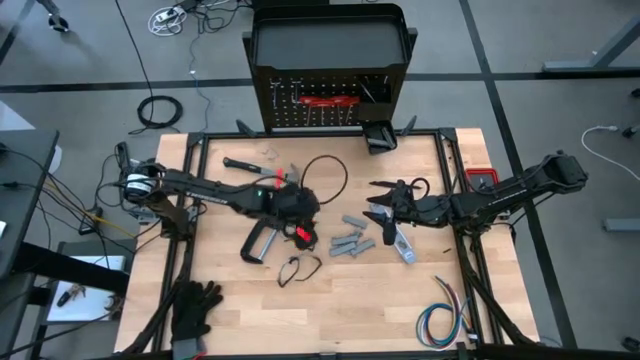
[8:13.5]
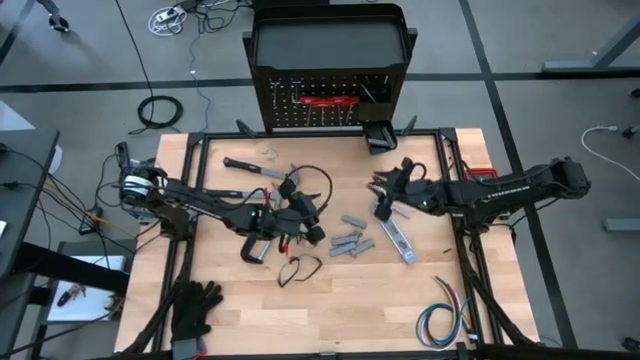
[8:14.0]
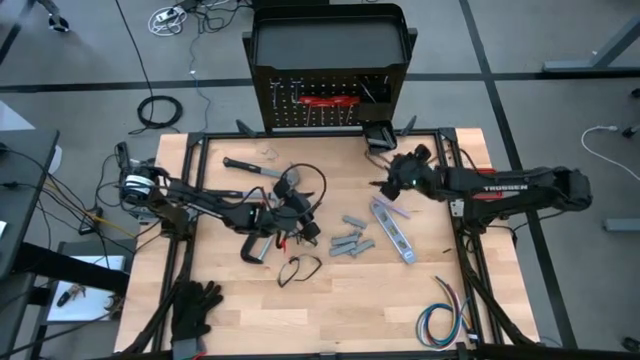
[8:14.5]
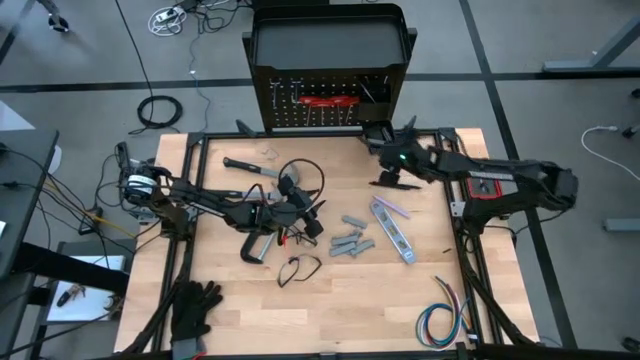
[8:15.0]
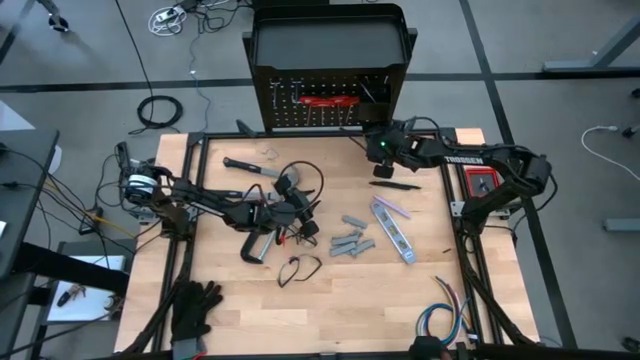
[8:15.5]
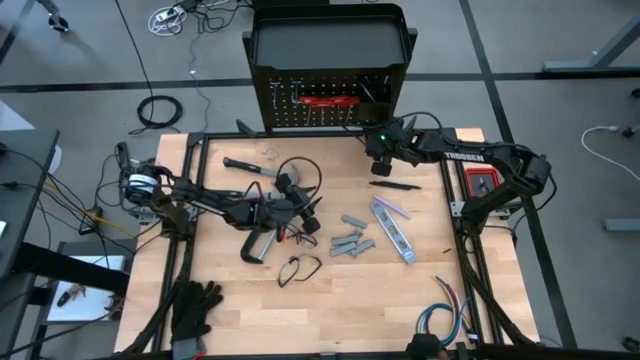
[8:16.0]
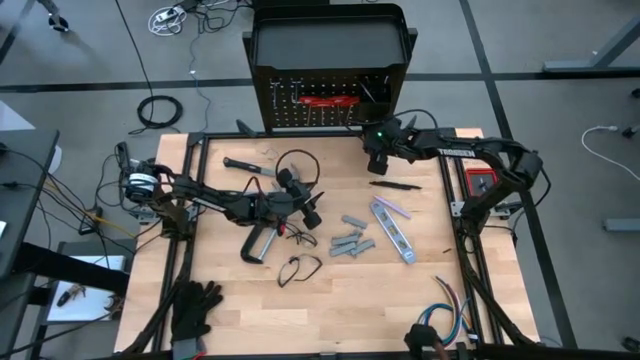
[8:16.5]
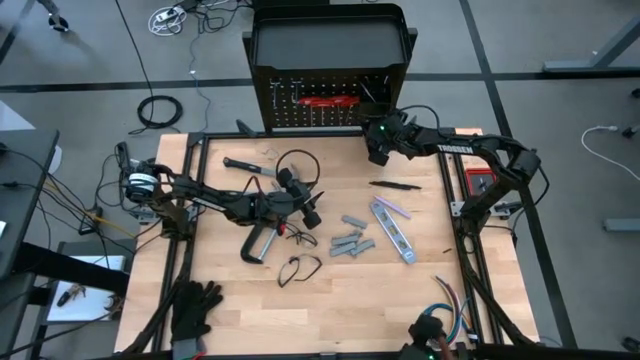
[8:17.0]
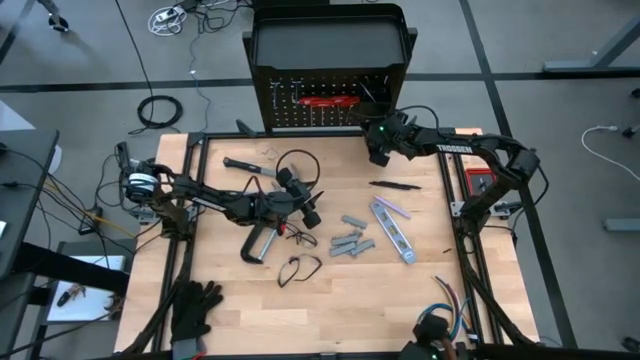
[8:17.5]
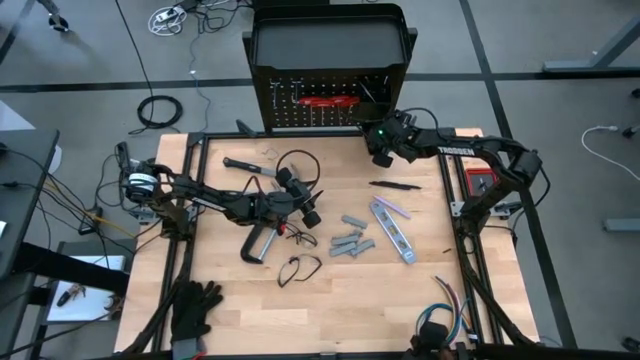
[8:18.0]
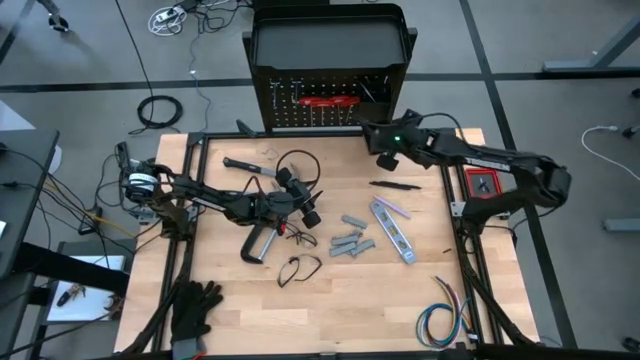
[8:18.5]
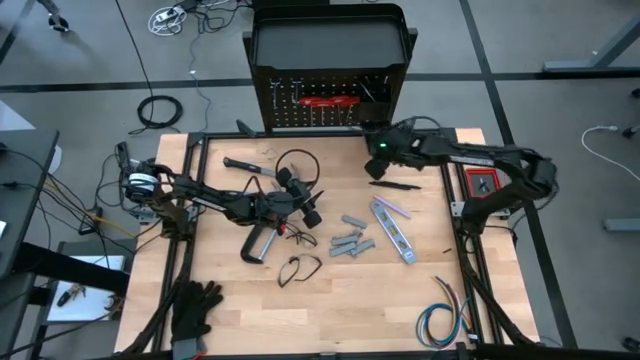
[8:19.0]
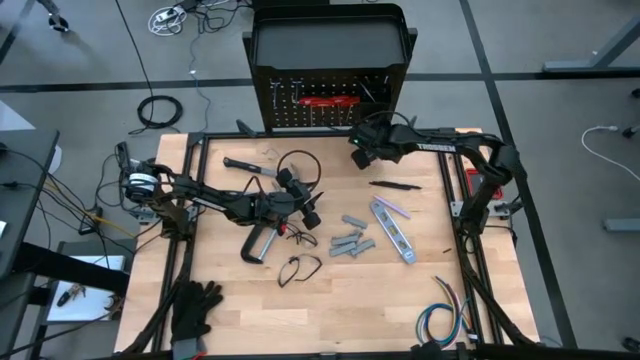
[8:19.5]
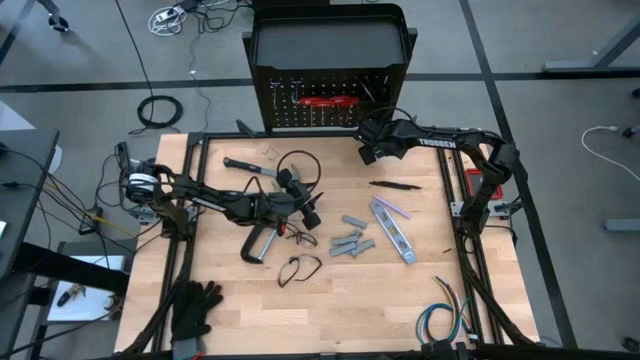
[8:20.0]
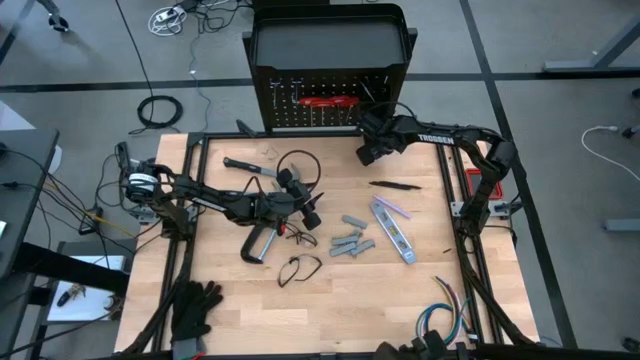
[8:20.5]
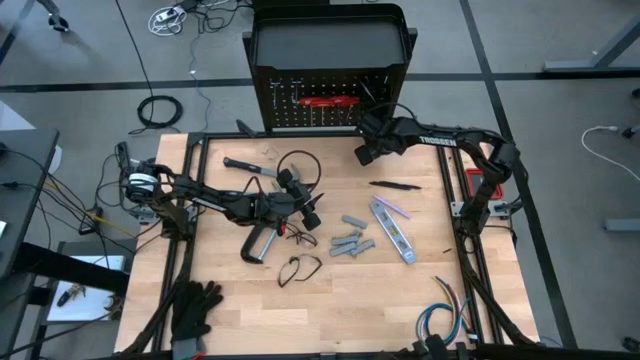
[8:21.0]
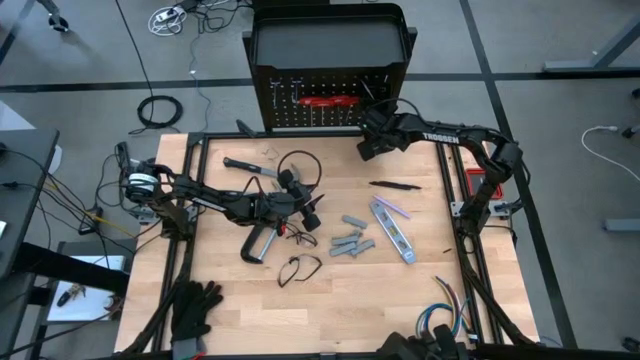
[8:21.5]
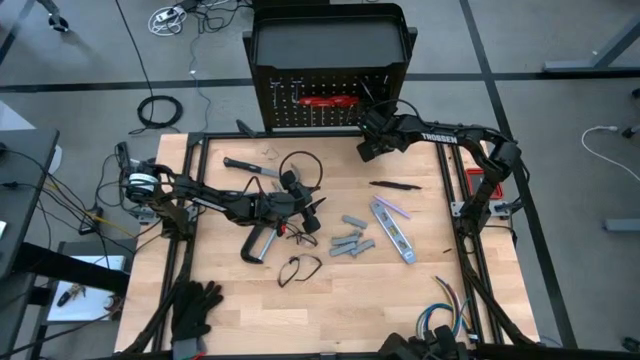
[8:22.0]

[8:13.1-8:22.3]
Task: Hang tools onto peg board
Put the screwdriver bits on the table

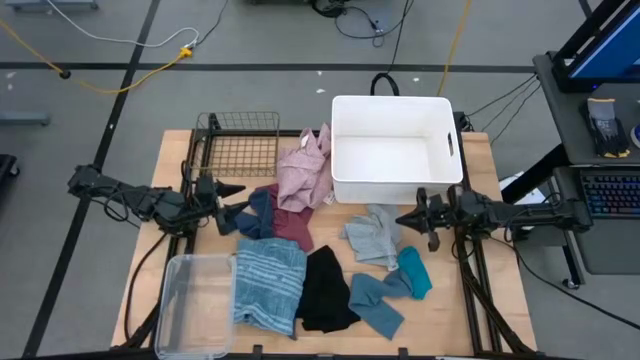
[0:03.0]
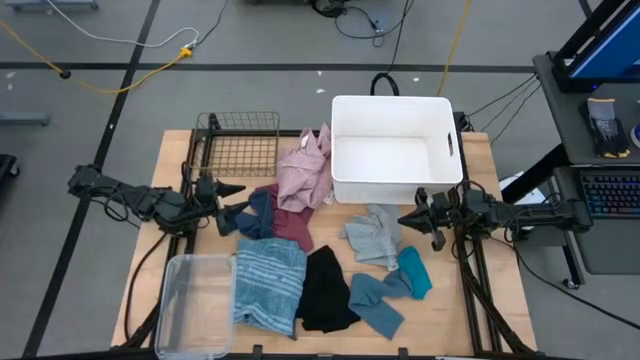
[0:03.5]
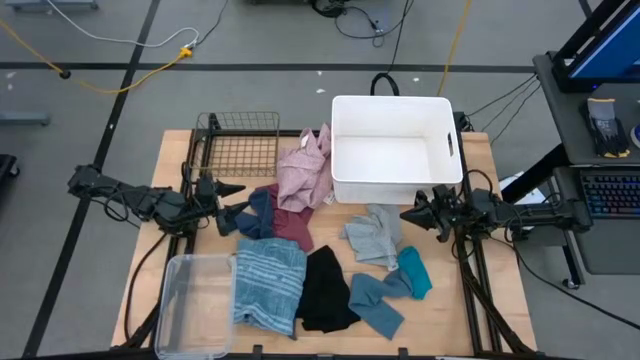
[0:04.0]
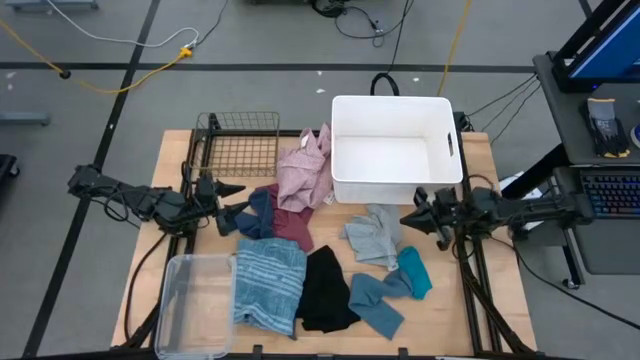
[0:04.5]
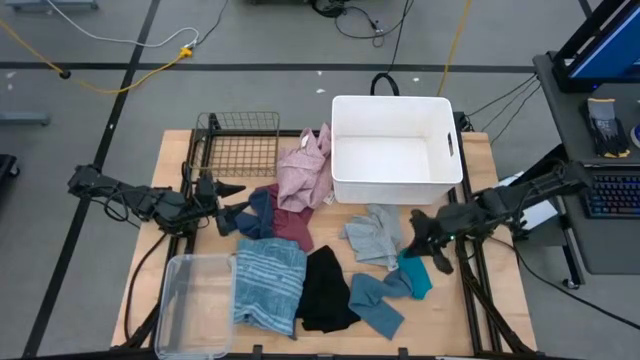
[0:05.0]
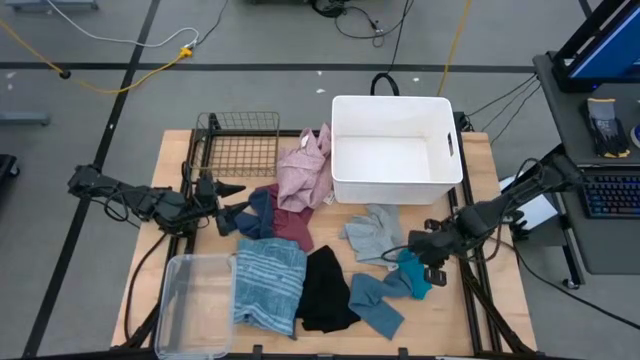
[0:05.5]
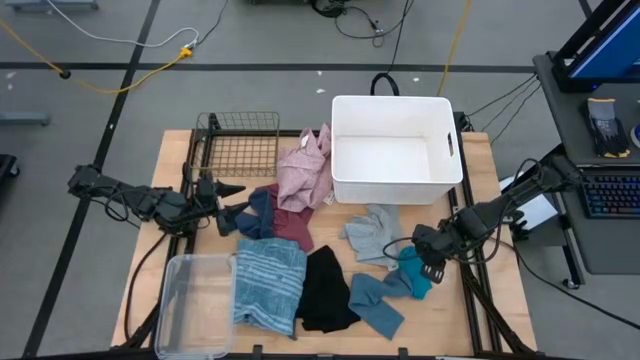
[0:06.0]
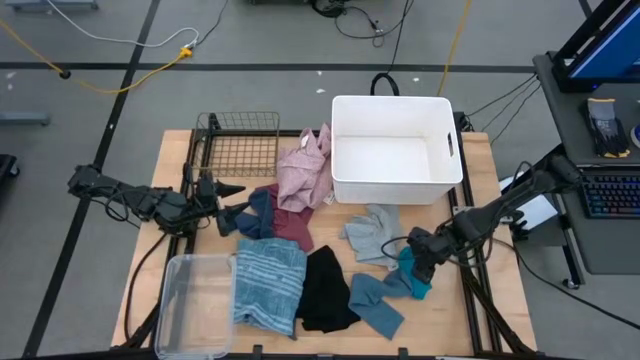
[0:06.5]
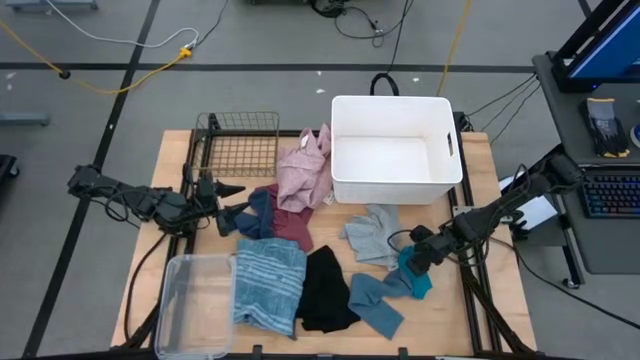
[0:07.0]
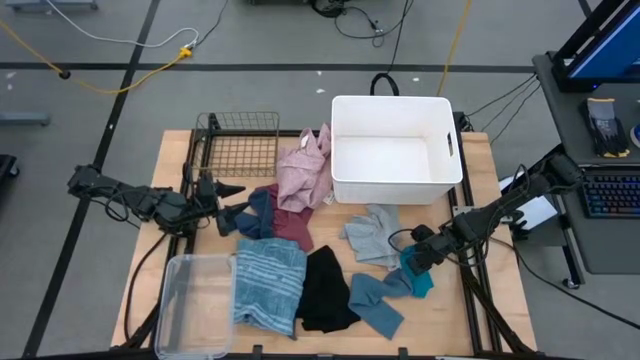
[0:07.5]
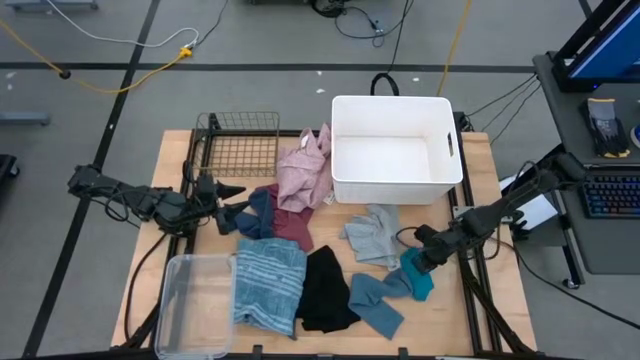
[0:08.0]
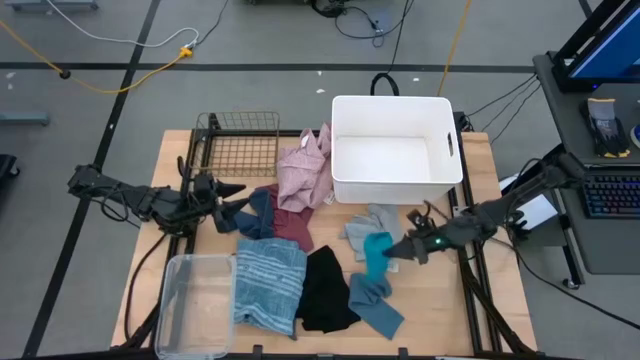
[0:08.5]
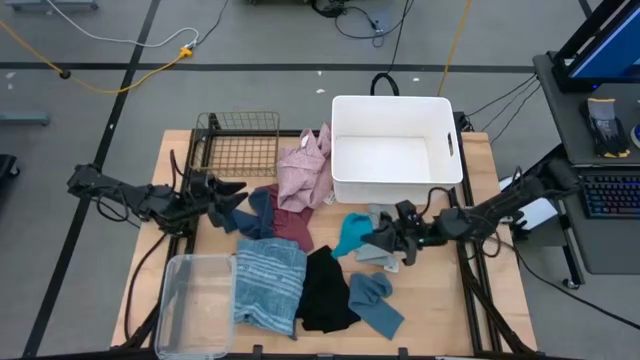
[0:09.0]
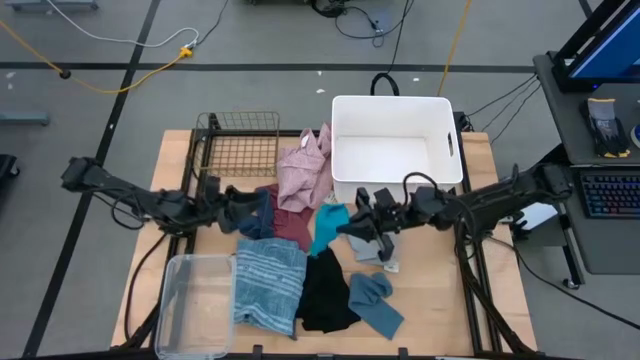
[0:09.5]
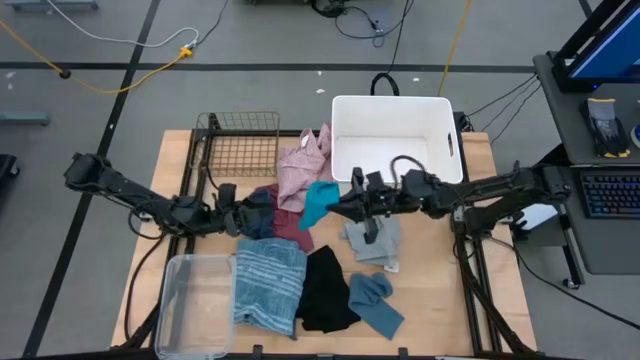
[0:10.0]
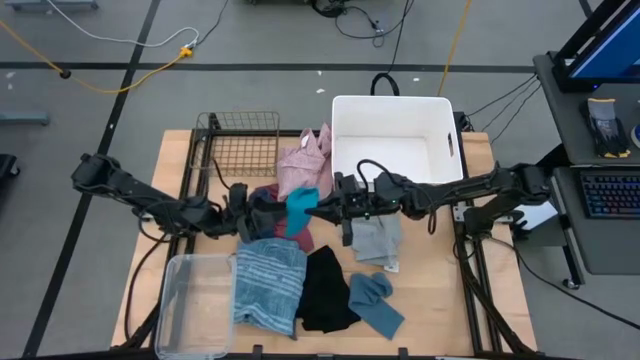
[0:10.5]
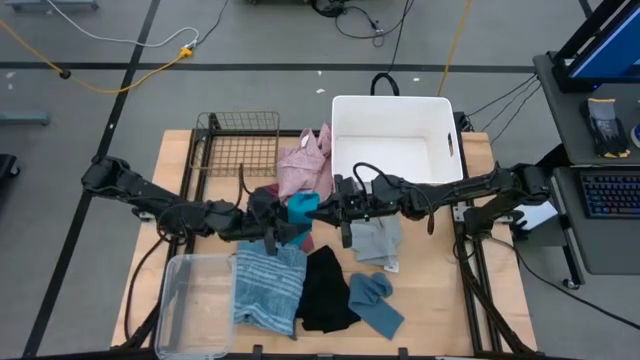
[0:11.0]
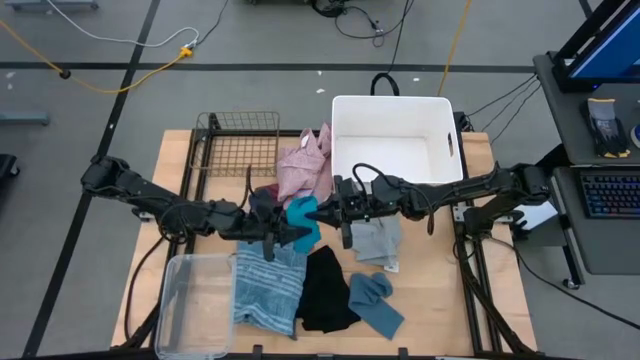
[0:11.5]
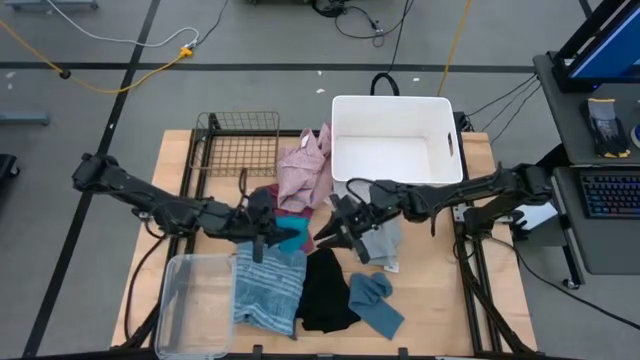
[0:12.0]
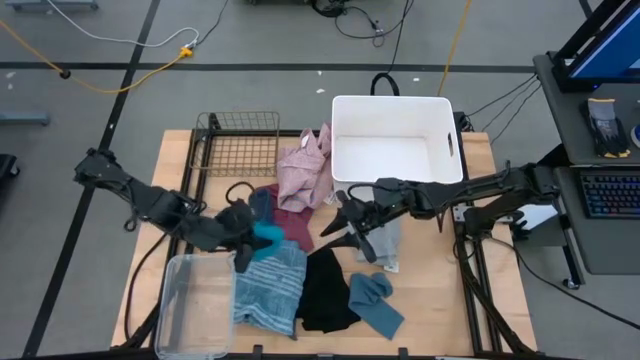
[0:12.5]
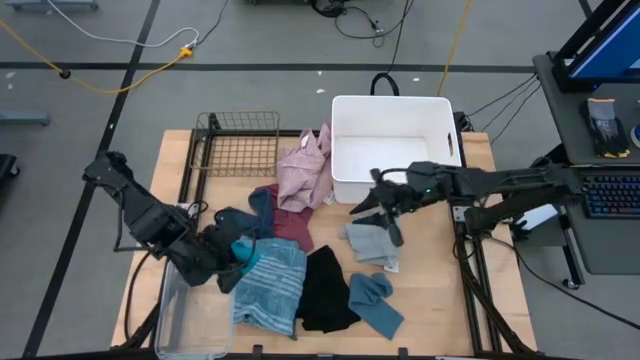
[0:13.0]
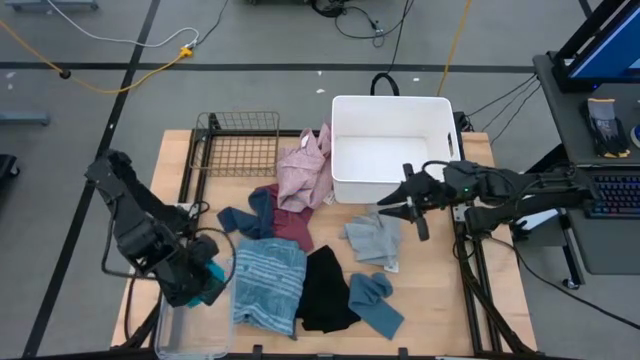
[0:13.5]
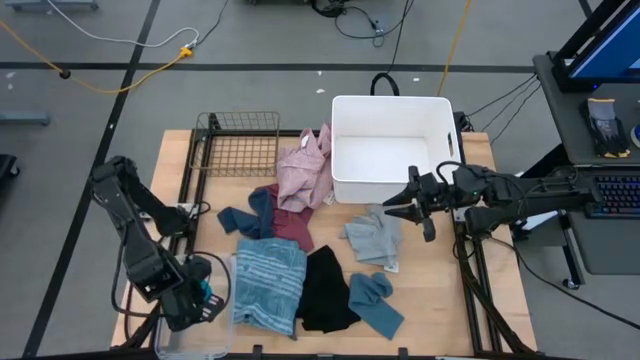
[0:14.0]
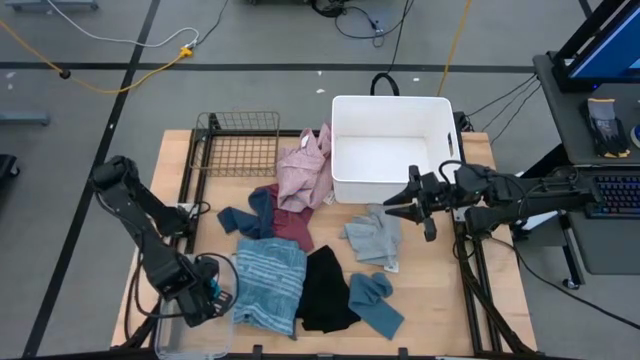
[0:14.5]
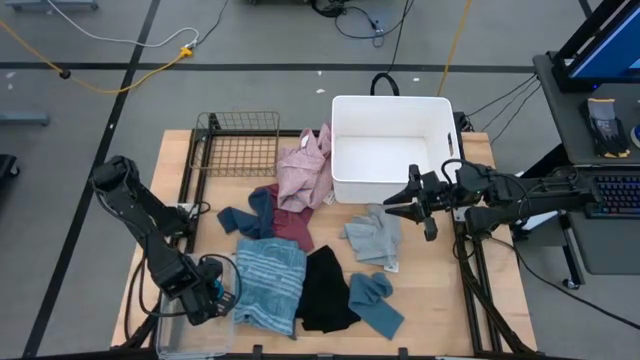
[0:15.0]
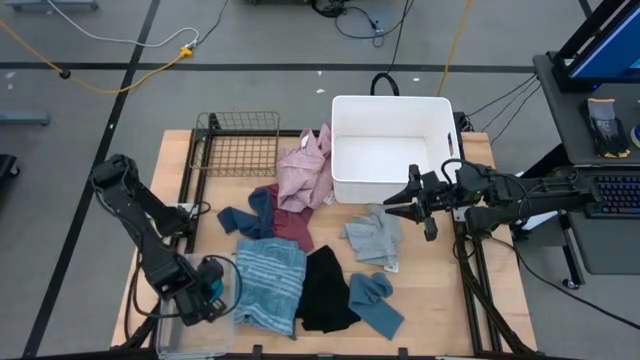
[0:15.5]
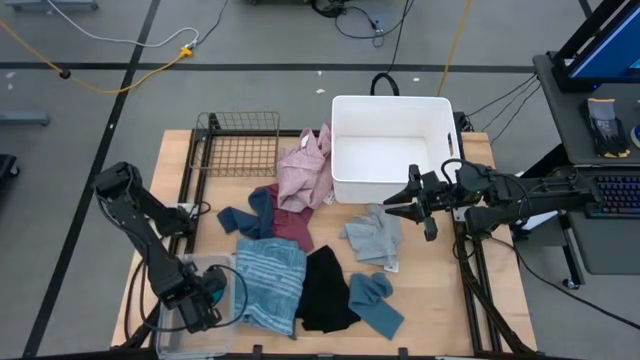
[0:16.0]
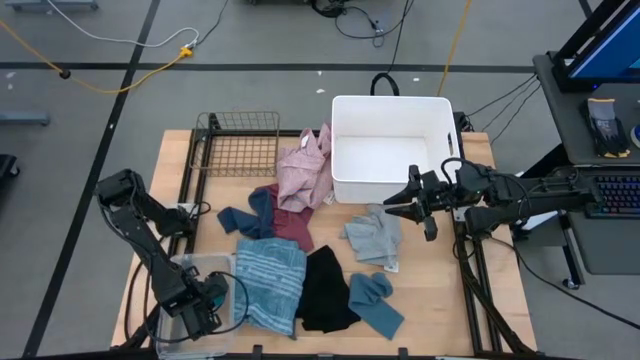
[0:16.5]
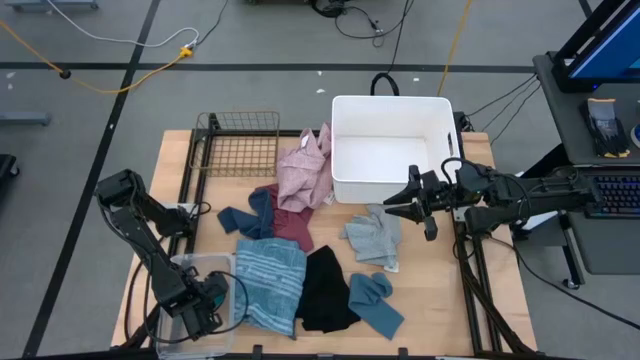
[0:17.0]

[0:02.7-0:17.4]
Task: Pick & Place Cloths
Put the light blue sock into the transparent bin
